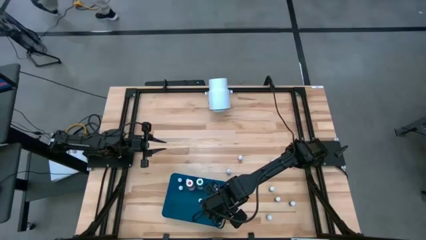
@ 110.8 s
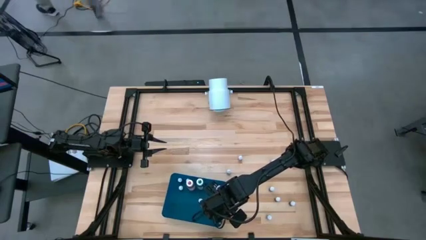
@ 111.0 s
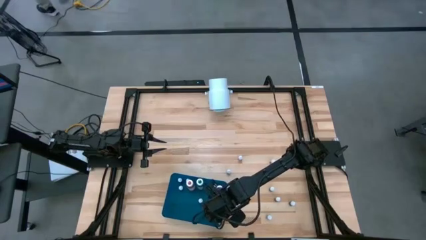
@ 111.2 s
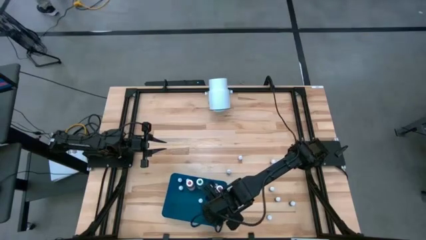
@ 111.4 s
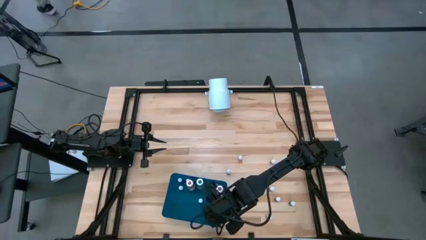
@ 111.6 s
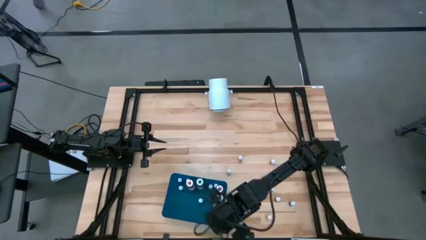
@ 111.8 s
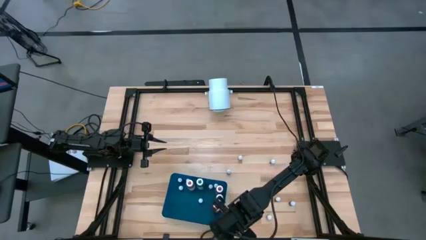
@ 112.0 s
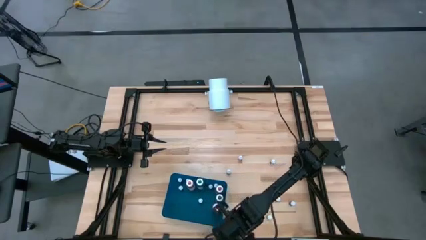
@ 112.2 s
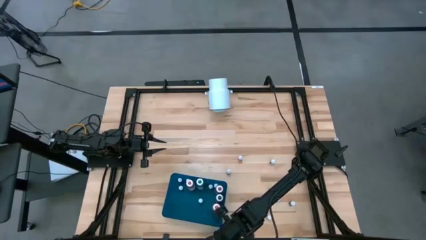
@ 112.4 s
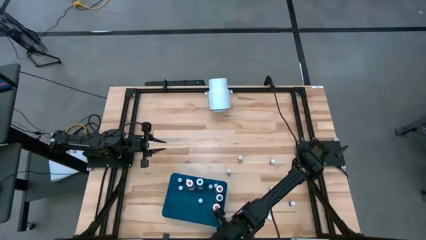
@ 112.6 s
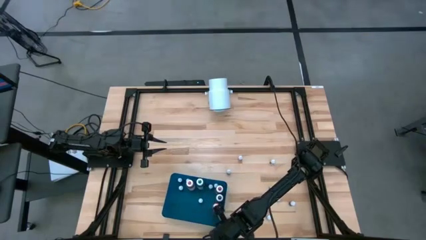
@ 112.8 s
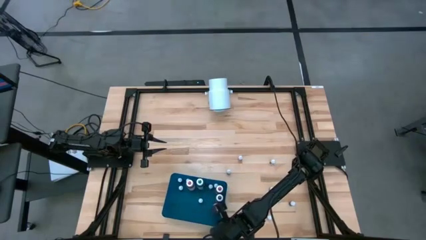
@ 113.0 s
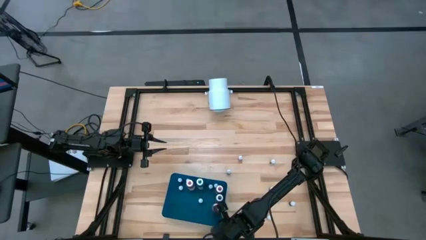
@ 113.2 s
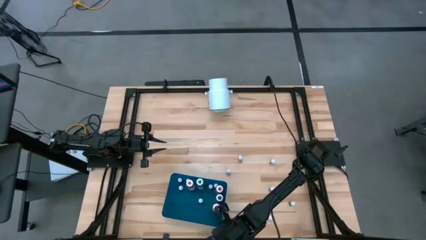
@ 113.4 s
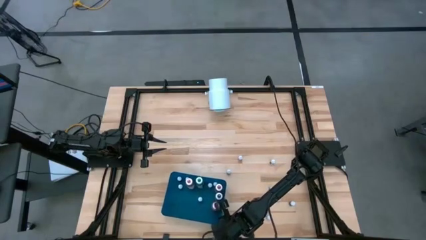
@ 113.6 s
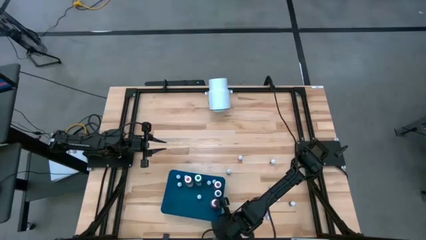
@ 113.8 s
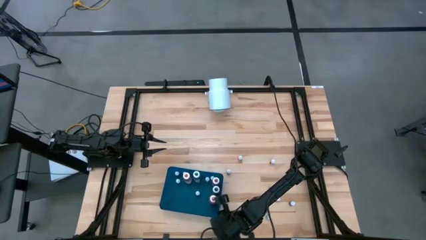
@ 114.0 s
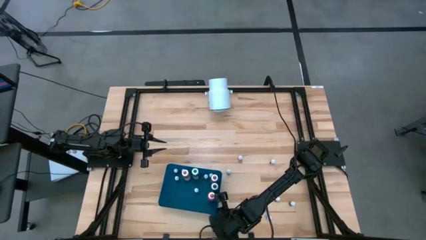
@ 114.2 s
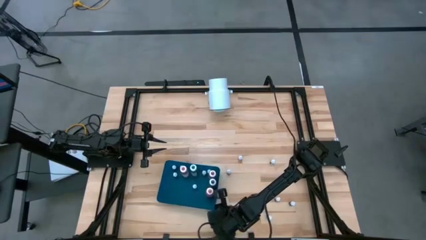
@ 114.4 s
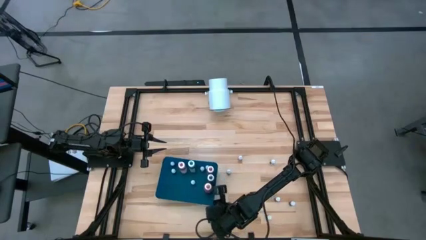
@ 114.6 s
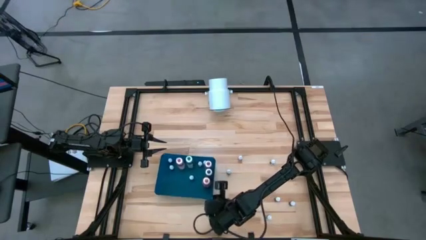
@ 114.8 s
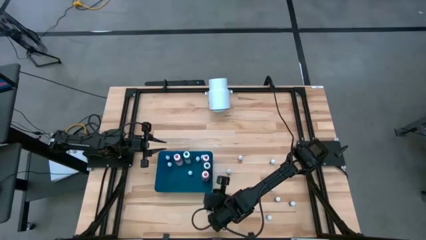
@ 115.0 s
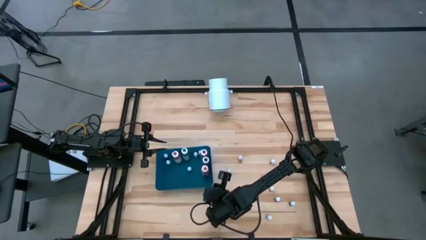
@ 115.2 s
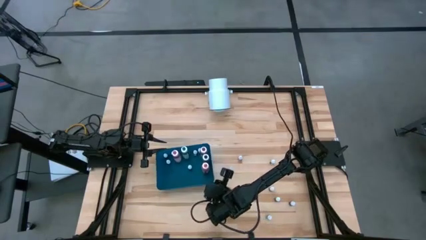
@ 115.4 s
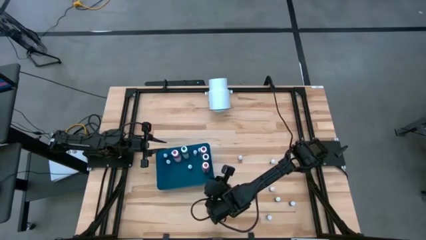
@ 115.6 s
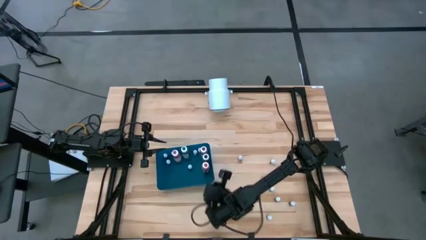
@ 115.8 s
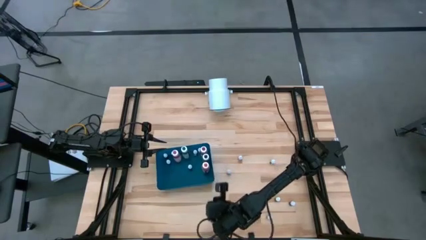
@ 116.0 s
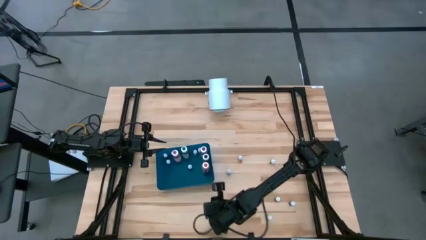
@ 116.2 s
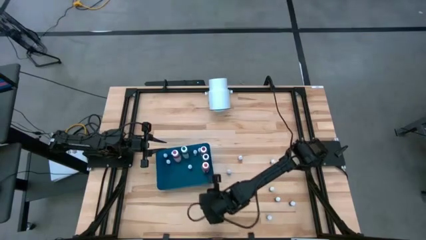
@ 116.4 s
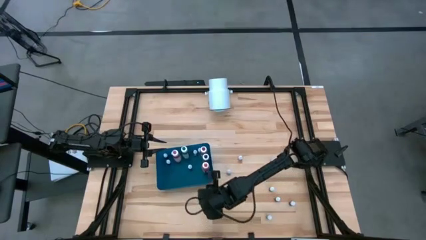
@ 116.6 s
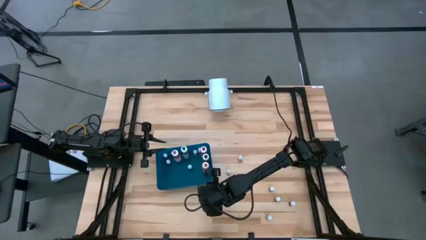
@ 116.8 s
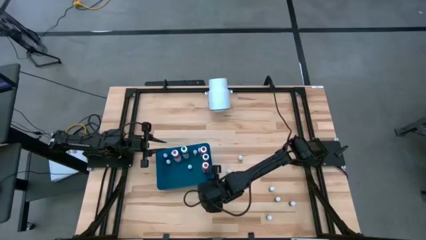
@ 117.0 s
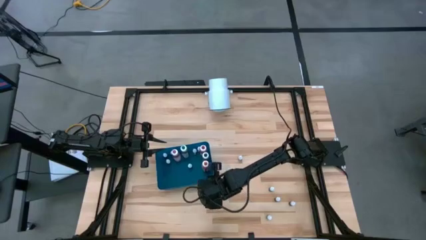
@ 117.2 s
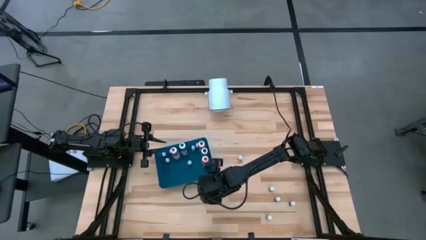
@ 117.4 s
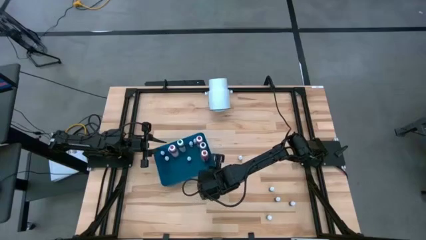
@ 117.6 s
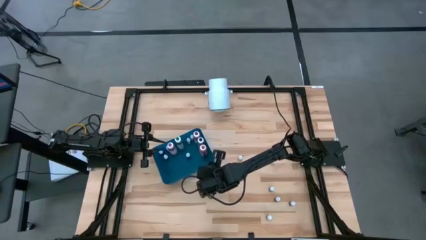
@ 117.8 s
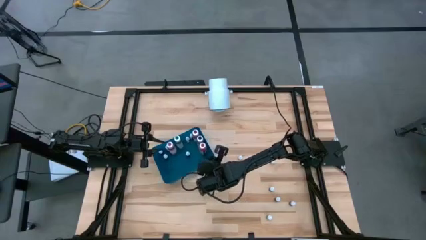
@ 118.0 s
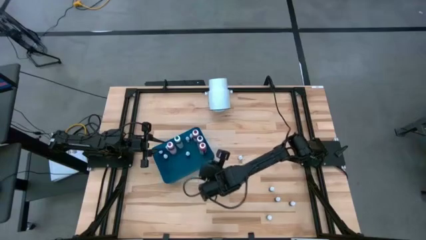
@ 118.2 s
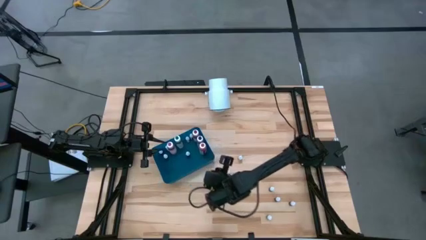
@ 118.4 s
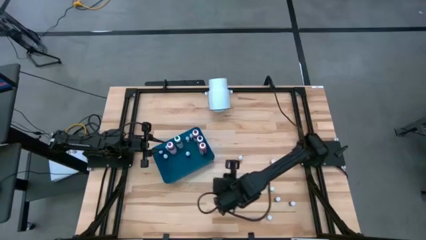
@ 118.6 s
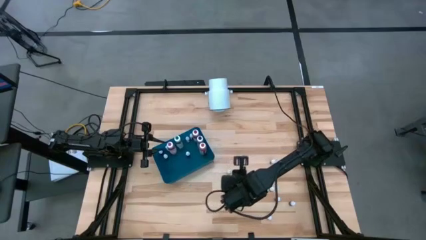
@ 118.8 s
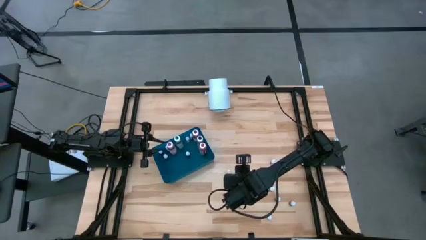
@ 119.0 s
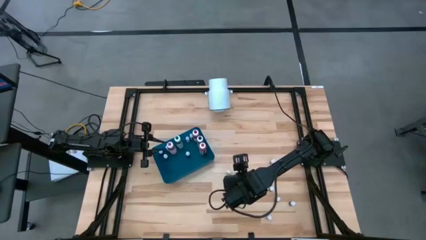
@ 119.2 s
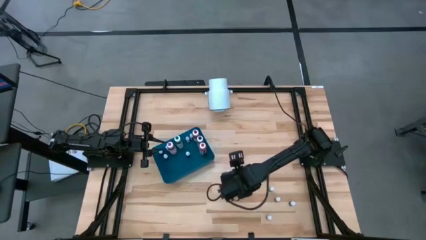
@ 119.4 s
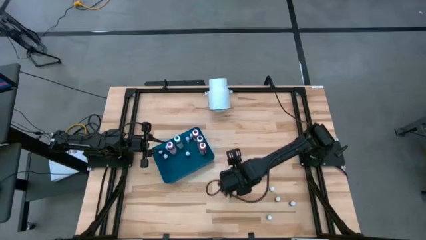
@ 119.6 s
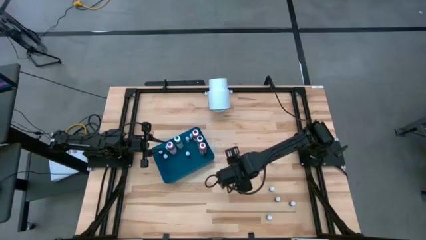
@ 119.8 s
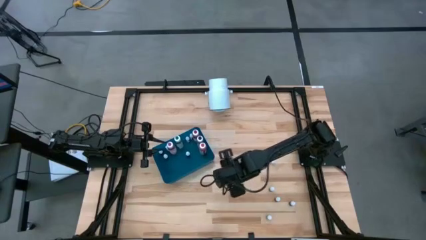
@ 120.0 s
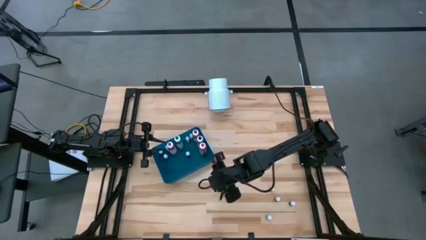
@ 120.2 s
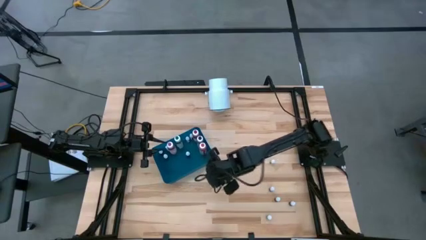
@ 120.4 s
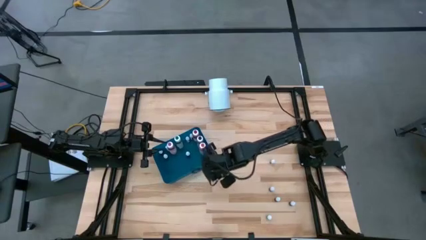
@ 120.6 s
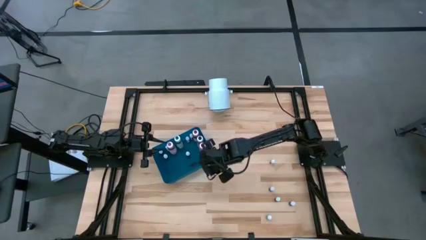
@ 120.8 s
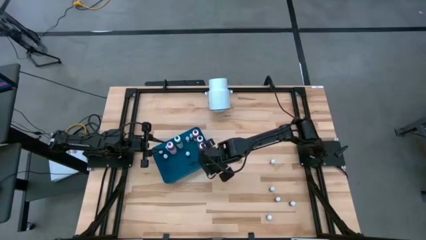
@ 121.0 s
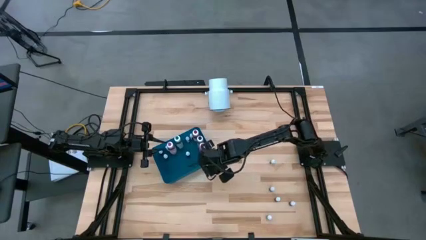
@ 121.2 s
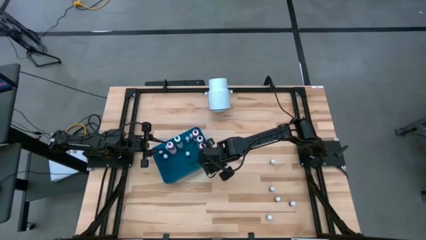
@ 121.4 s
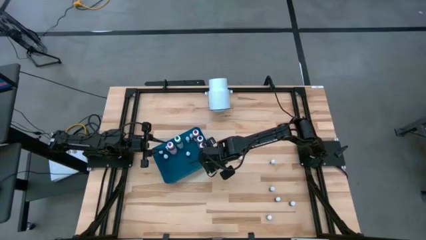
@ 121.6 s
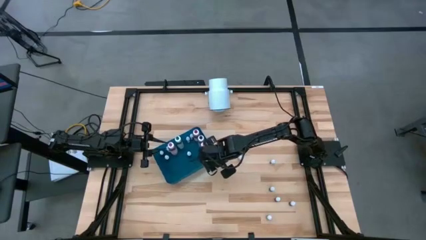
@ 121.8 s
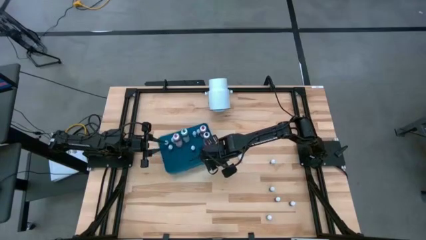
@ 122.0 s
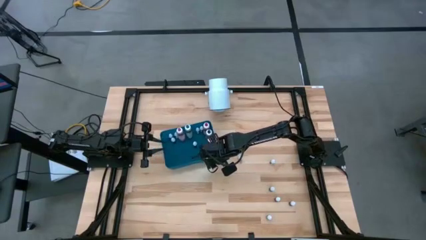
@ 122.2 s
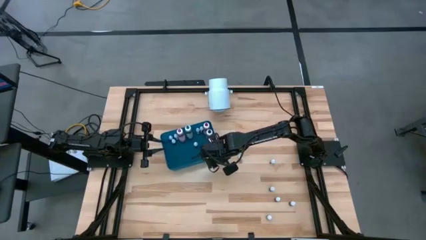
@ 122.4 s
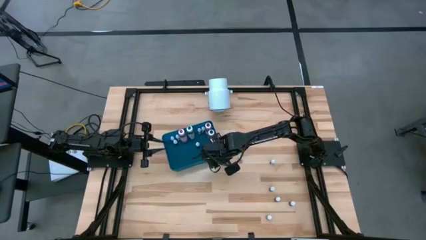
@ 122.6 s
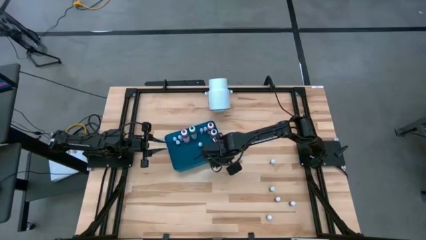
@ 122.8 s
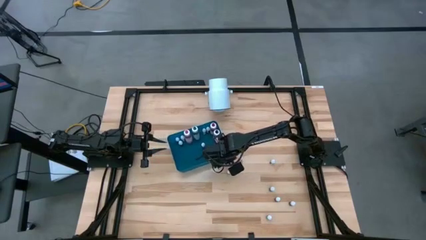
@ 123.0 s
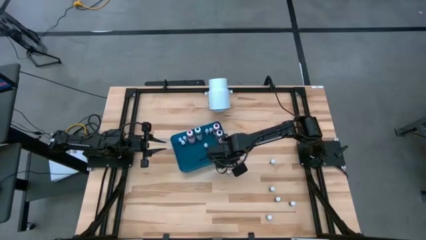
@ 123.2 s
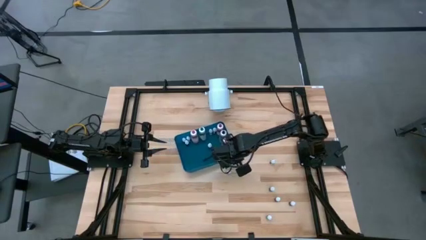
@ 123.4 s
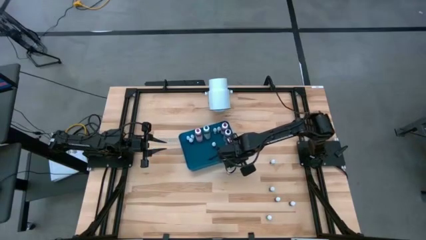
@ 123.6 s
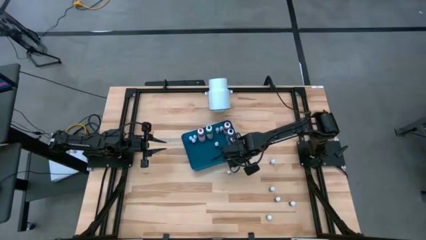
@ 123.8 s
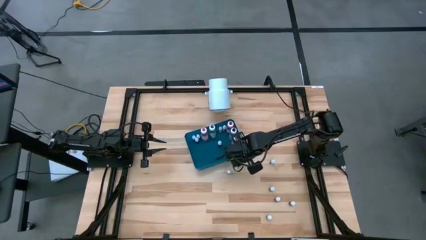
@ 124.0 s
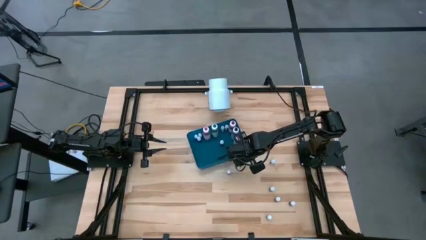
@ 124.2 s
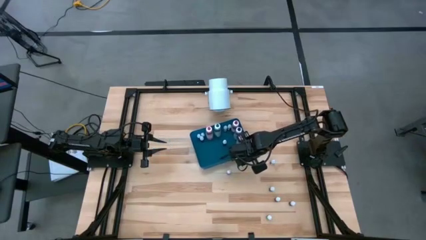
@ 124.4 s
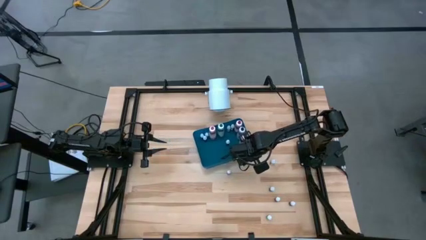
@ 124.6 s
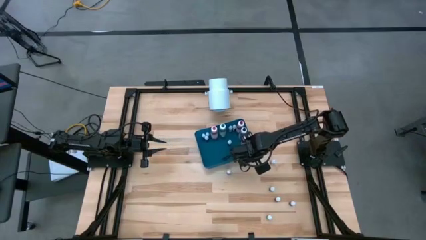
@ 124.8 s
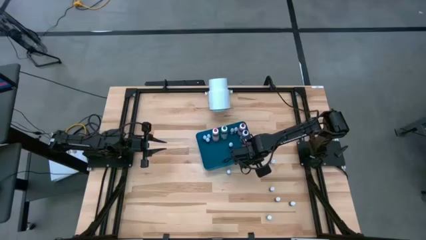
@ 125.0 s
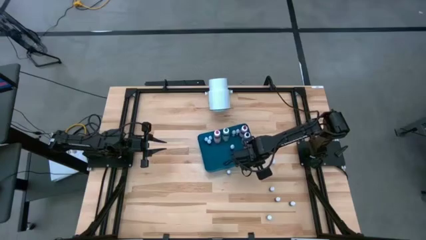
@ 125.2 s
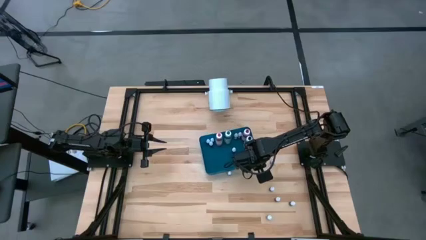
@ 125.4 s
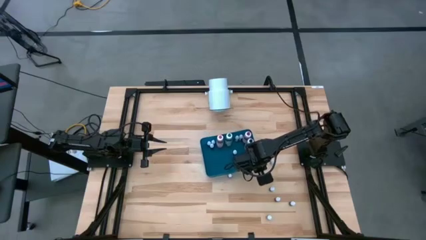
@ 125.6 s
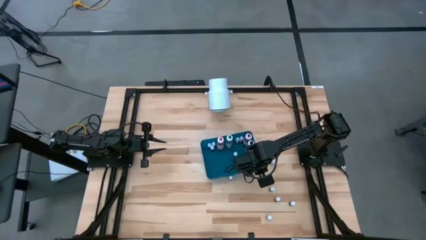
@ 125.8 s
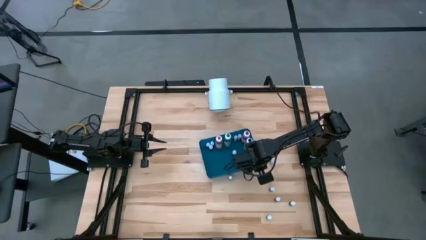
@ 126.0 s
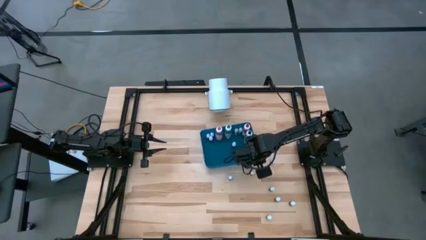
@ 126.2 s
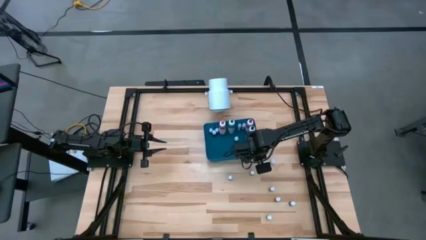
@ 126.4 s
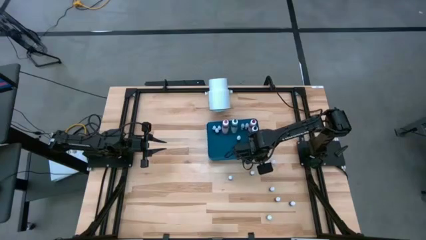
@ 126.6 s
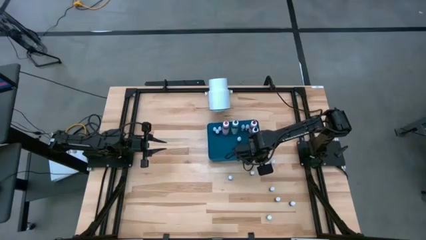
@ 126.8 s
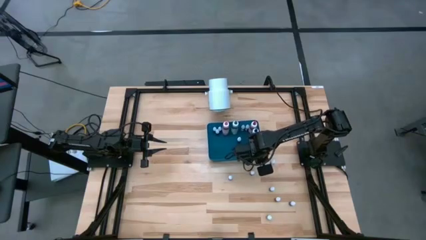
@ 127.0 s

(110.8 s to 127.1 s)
Task: Pick & Place food coloring
Move the blue bin to the center of the table
